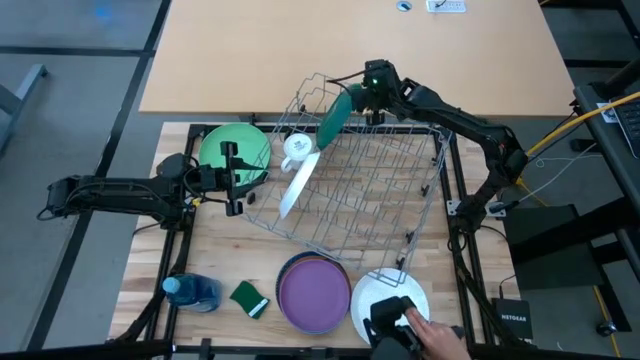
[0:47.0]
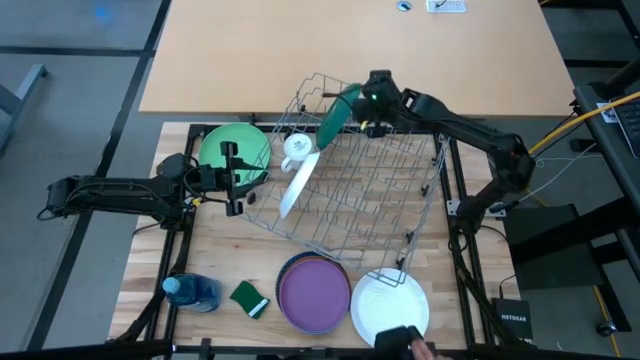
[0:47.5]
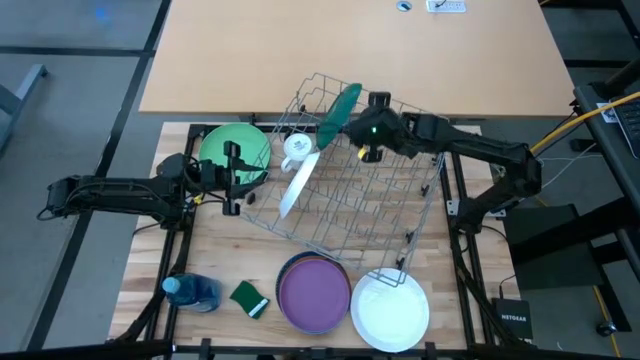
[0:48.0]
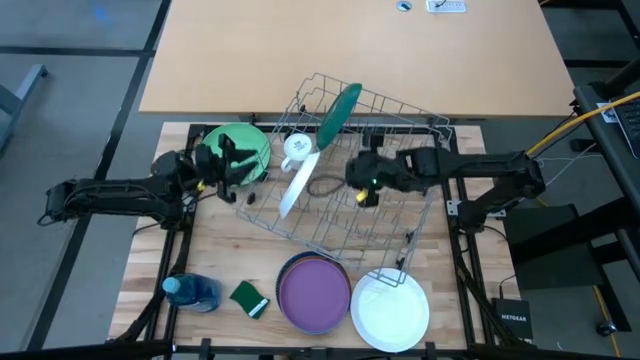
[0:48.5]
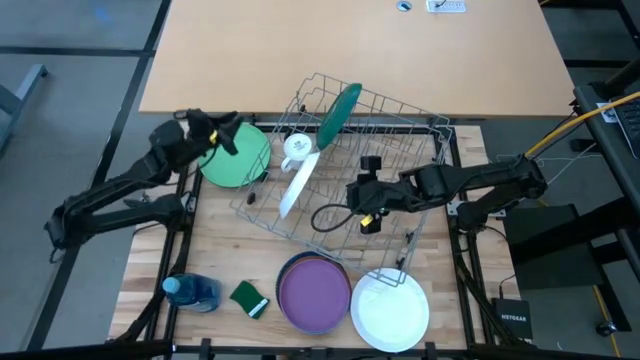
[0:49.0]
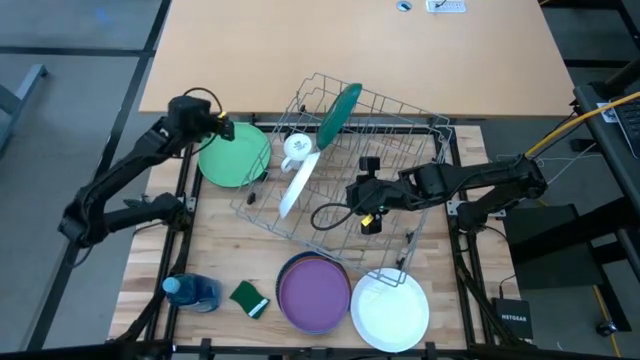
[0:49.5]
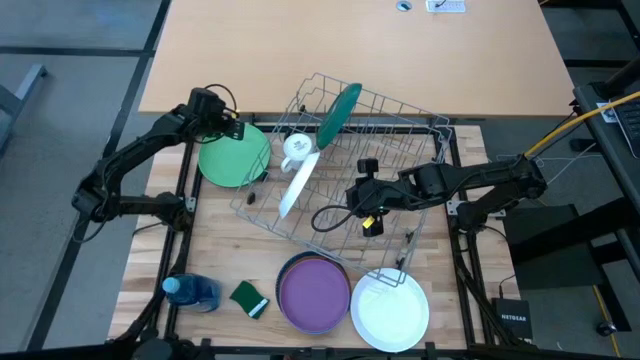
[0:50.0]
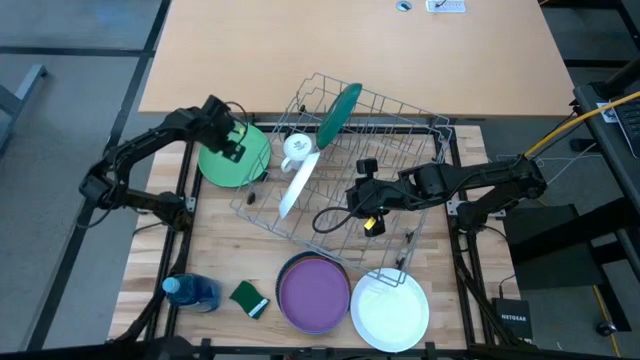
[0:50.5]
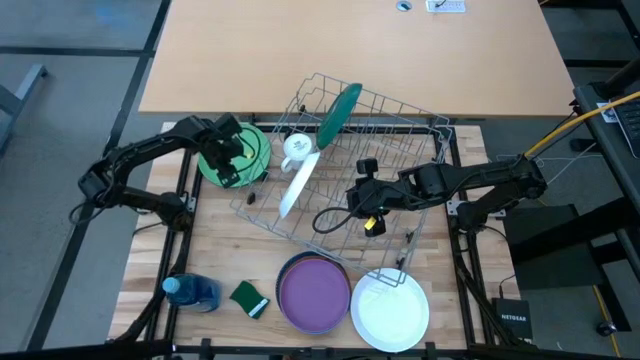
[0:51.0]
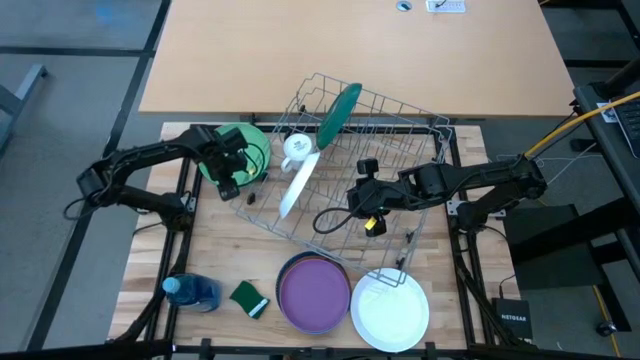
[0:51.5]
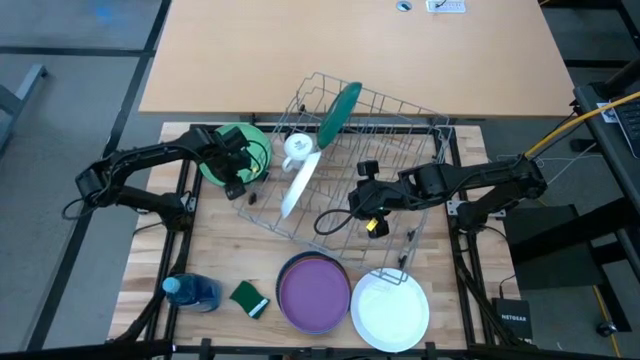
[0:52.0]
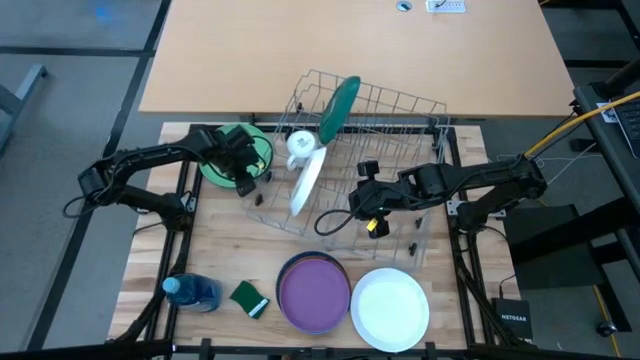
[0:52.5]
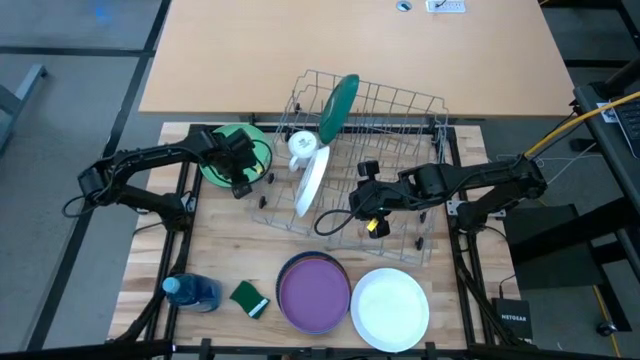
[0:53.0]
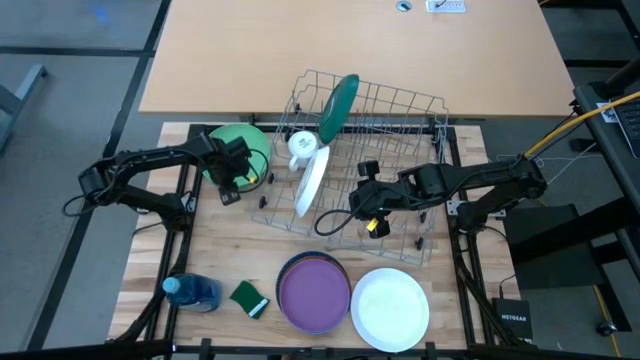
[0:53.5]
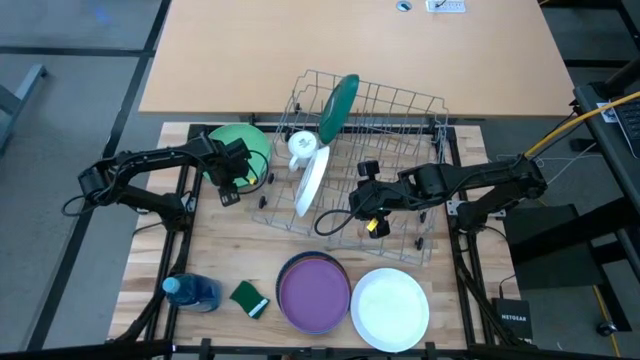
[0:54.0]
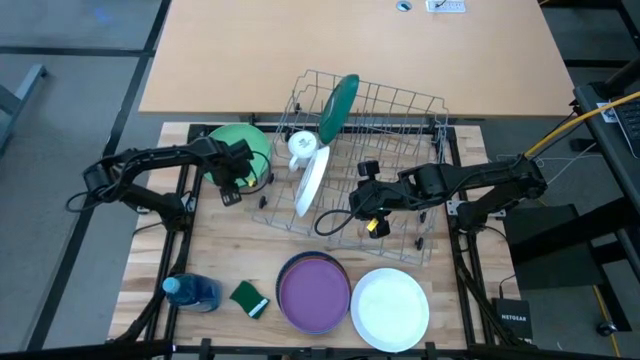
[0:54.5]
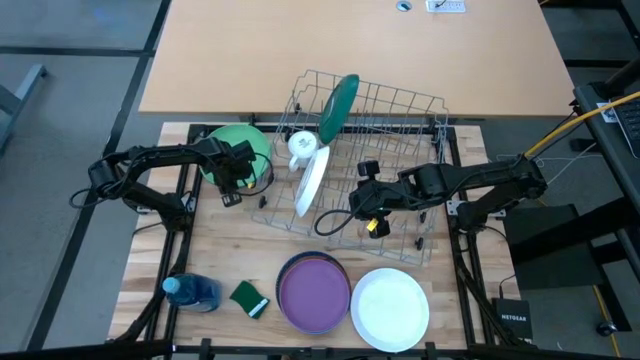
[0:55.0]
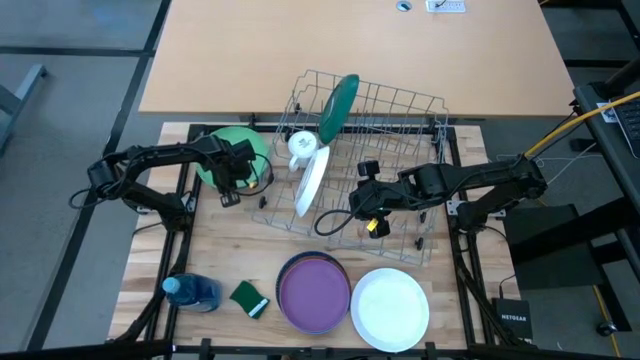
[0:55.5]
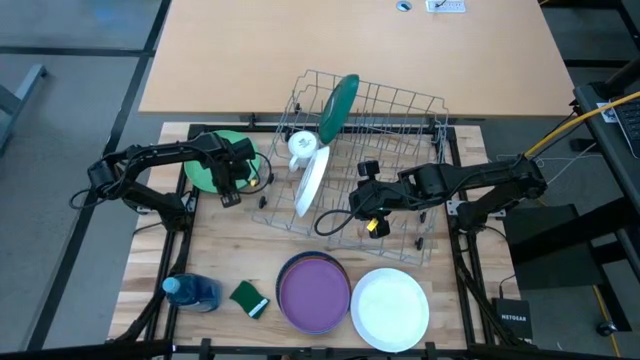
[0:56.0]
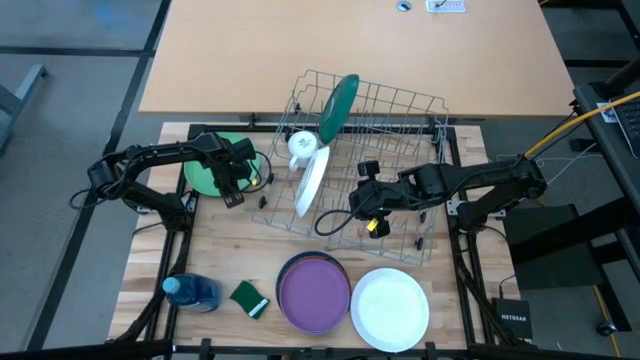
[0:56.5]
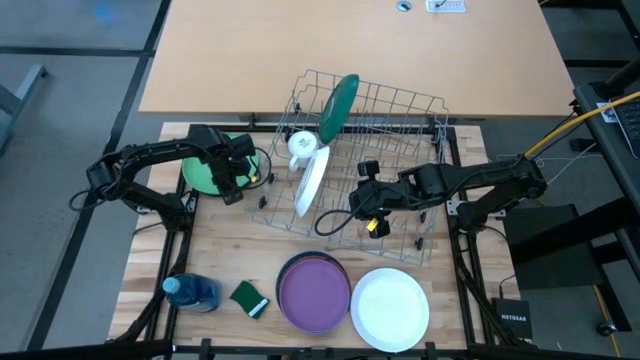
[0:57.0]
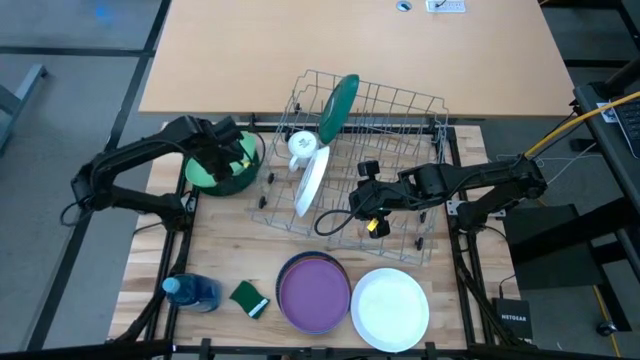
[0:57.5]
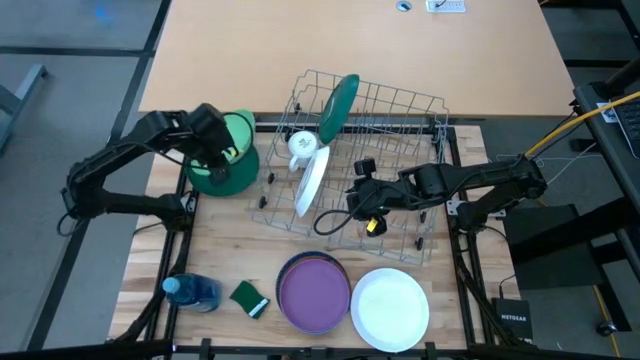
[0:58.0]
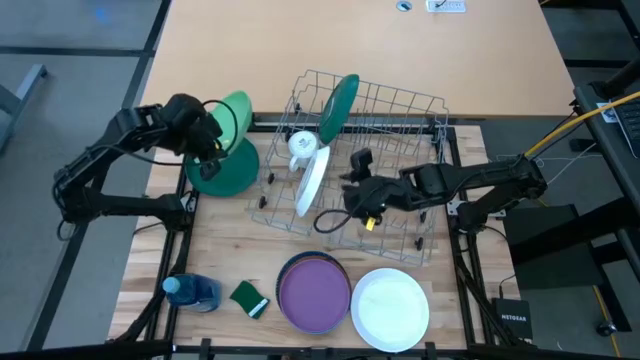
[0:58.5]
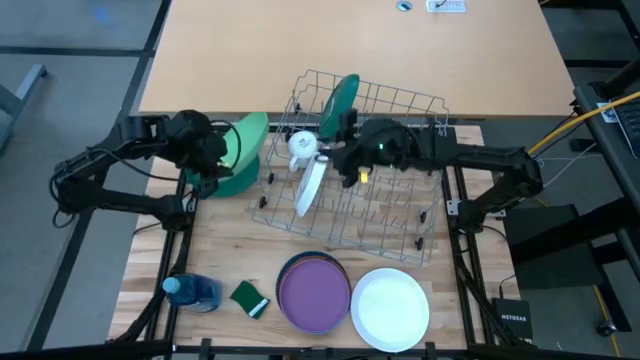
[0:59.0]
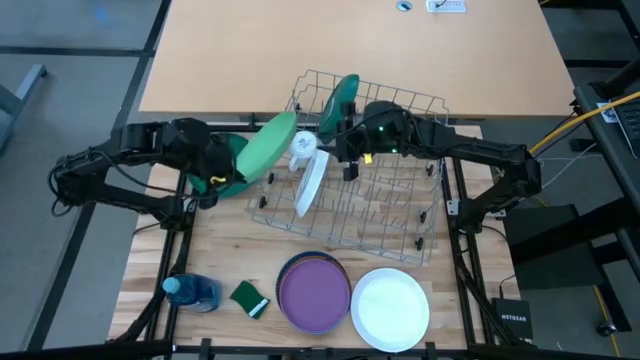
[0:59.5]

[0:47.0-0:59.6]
Task: Sort dishes
Put the green plate in the dish rack
